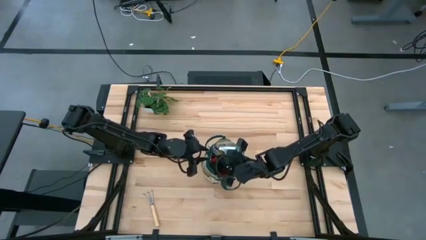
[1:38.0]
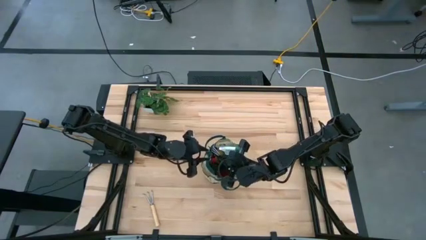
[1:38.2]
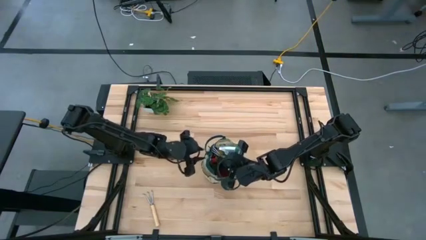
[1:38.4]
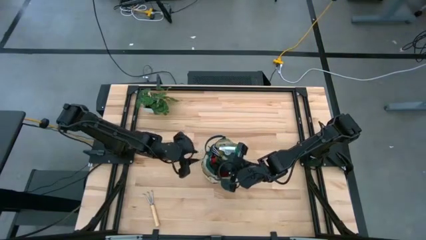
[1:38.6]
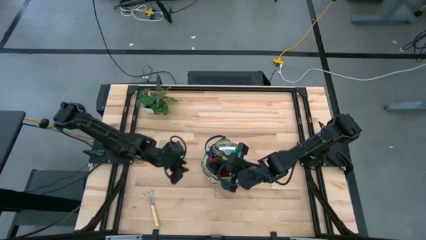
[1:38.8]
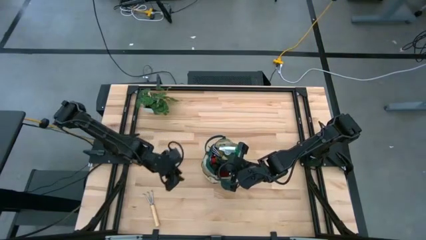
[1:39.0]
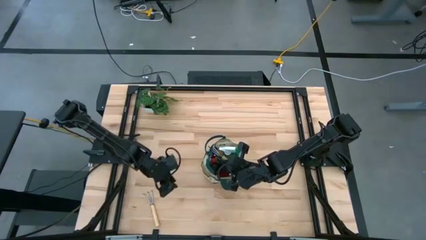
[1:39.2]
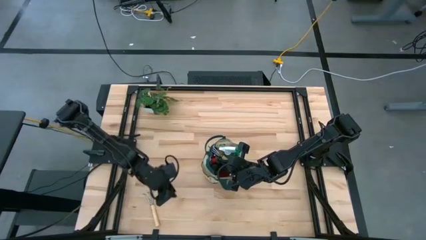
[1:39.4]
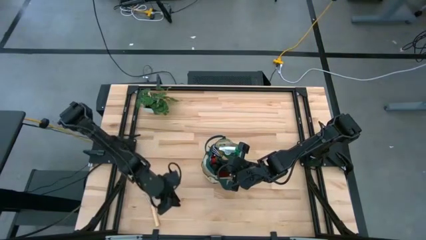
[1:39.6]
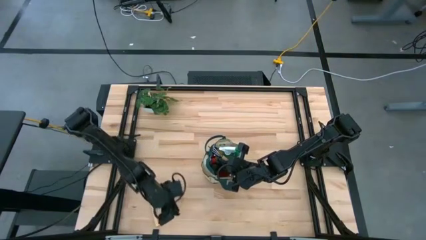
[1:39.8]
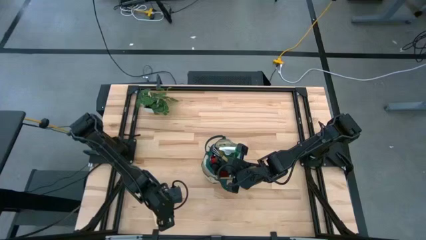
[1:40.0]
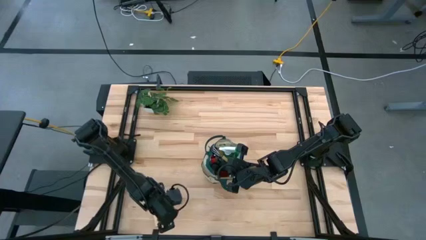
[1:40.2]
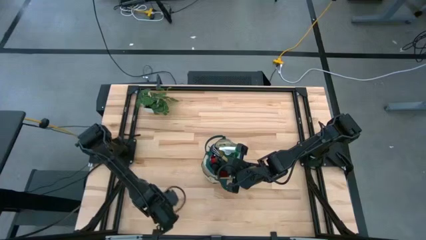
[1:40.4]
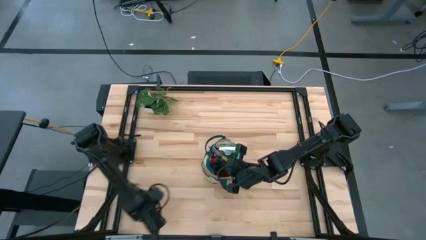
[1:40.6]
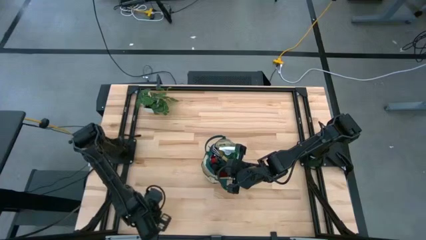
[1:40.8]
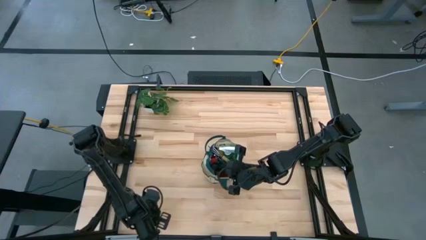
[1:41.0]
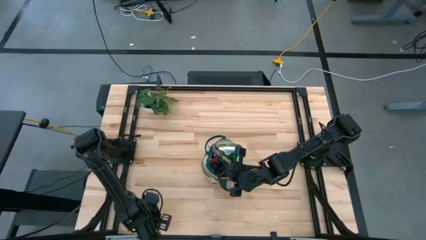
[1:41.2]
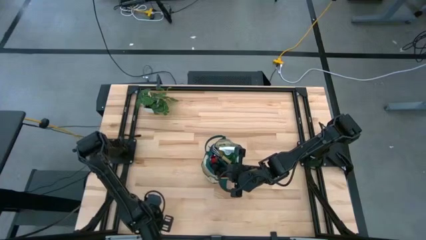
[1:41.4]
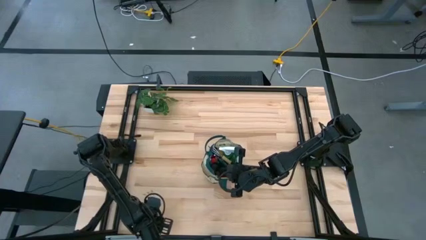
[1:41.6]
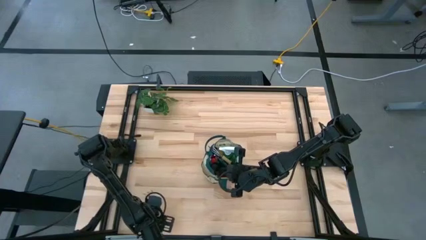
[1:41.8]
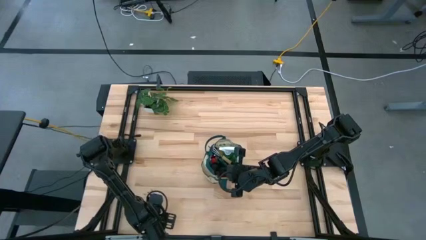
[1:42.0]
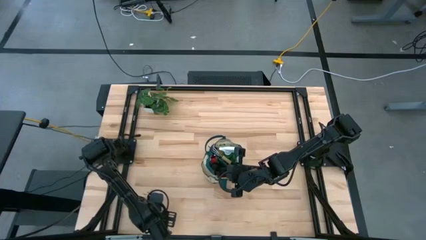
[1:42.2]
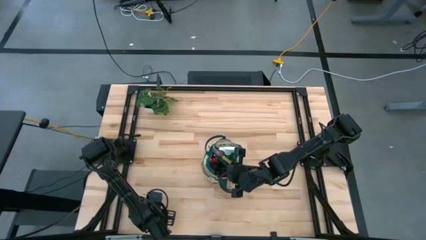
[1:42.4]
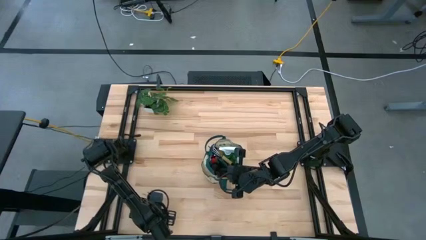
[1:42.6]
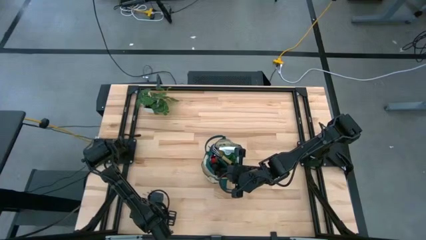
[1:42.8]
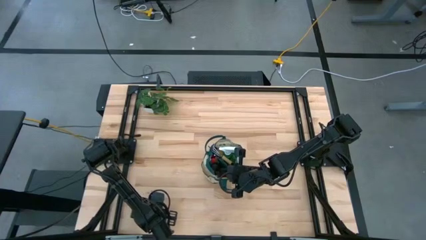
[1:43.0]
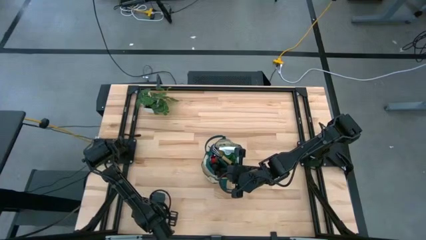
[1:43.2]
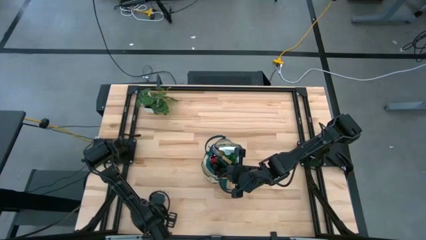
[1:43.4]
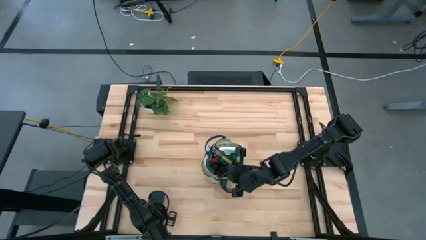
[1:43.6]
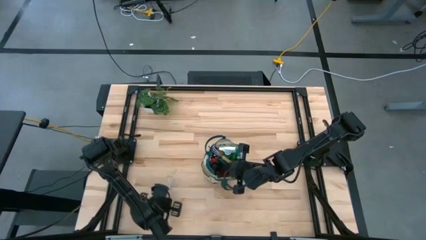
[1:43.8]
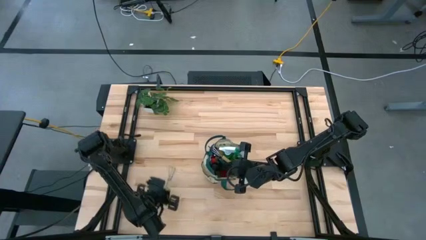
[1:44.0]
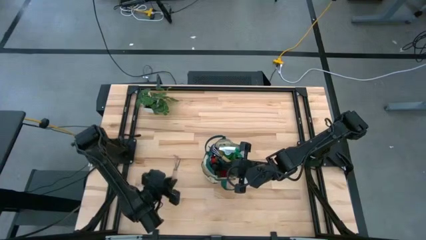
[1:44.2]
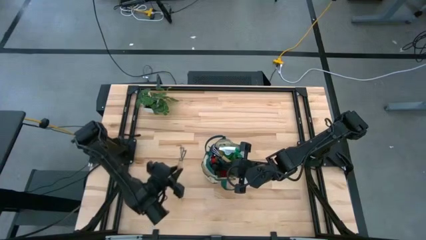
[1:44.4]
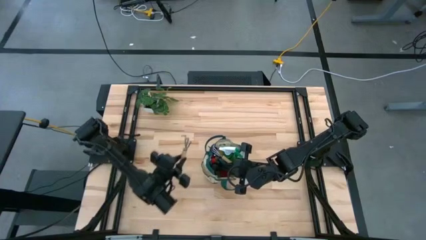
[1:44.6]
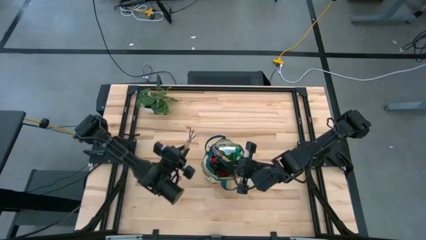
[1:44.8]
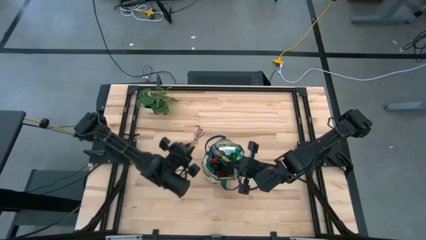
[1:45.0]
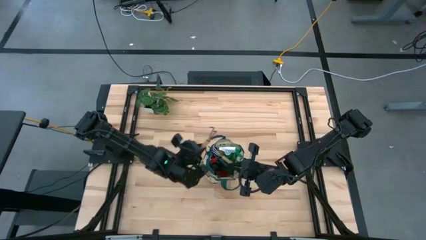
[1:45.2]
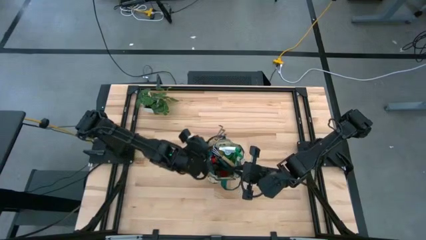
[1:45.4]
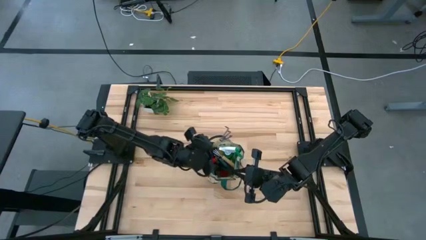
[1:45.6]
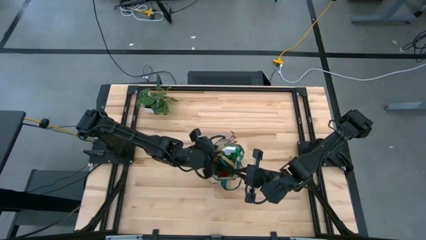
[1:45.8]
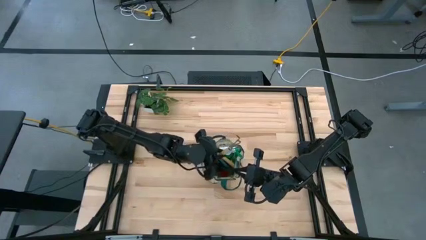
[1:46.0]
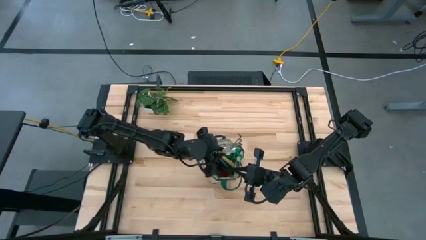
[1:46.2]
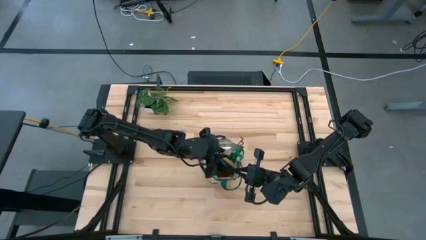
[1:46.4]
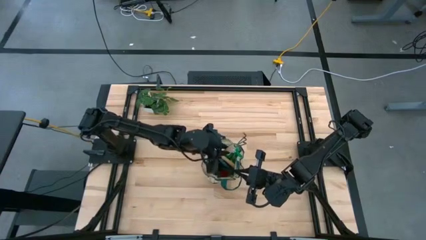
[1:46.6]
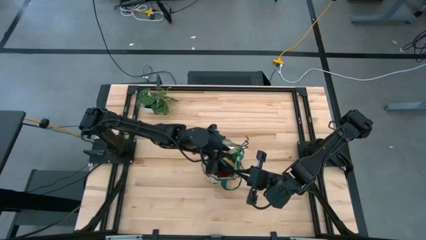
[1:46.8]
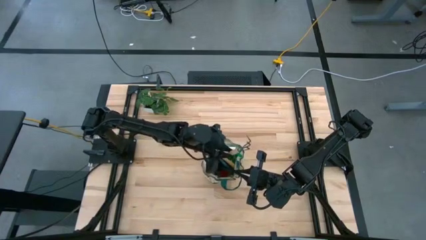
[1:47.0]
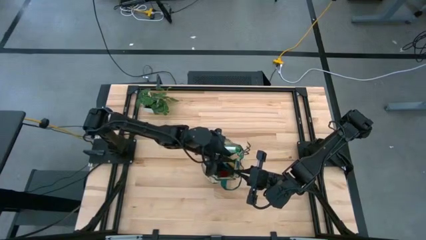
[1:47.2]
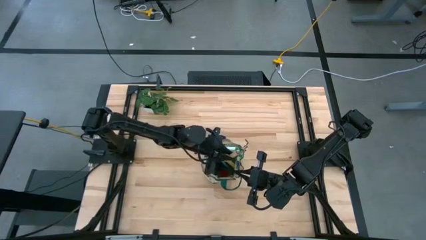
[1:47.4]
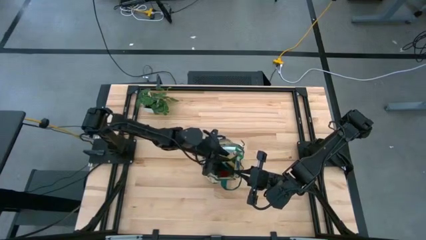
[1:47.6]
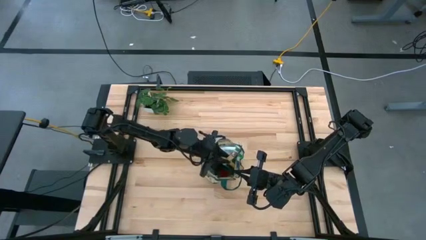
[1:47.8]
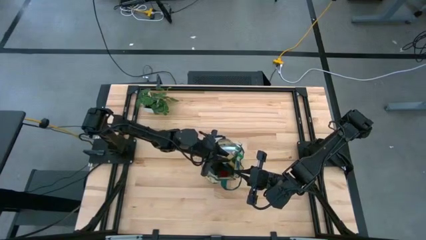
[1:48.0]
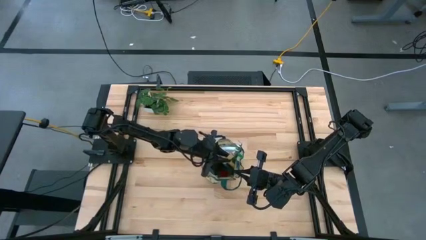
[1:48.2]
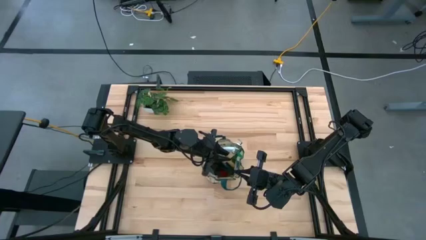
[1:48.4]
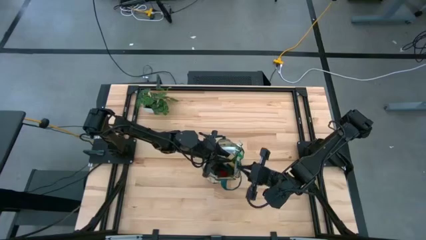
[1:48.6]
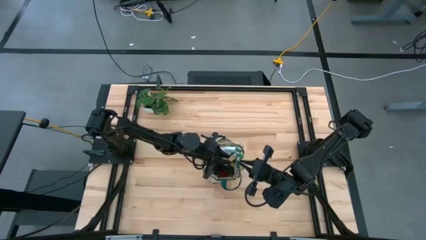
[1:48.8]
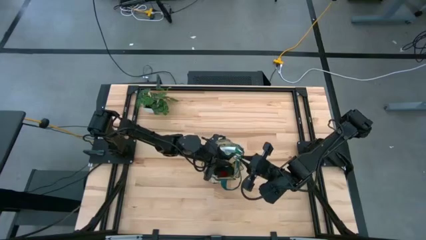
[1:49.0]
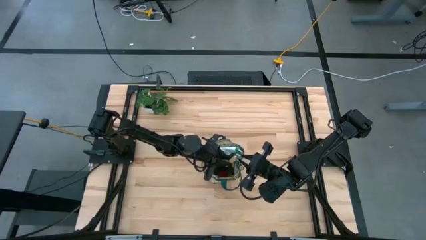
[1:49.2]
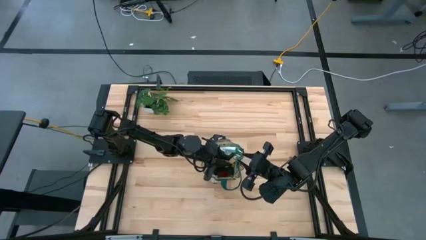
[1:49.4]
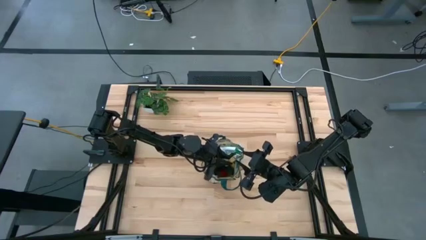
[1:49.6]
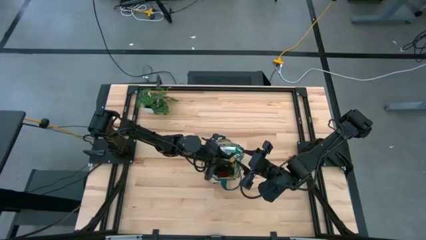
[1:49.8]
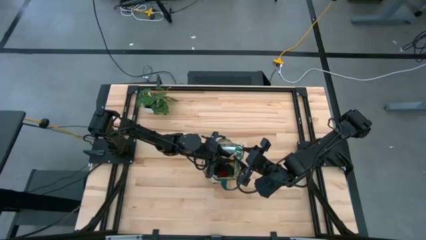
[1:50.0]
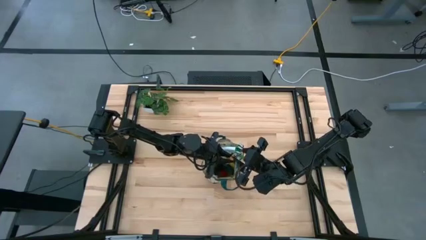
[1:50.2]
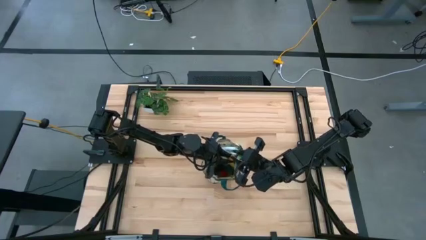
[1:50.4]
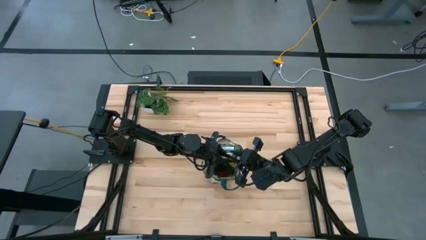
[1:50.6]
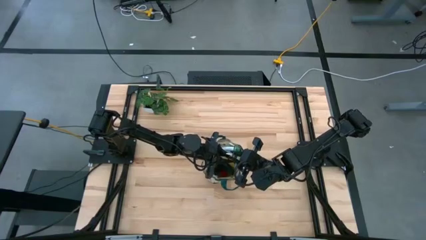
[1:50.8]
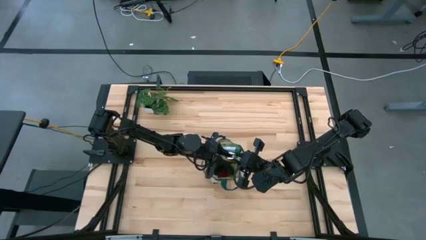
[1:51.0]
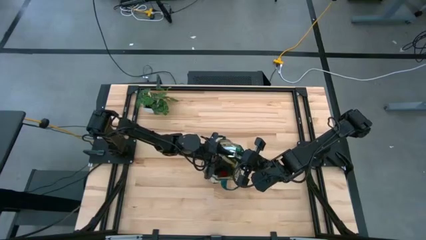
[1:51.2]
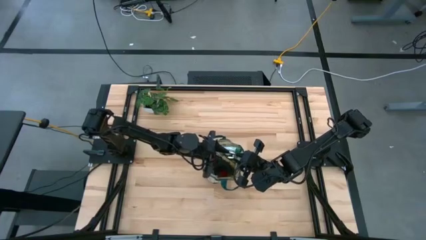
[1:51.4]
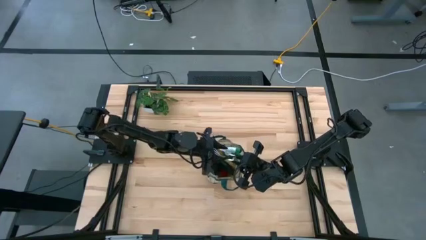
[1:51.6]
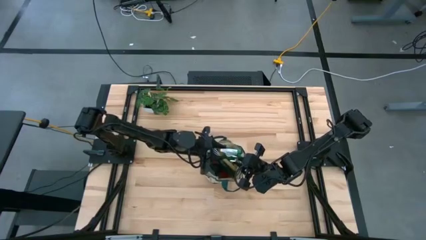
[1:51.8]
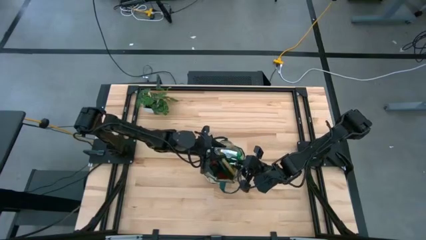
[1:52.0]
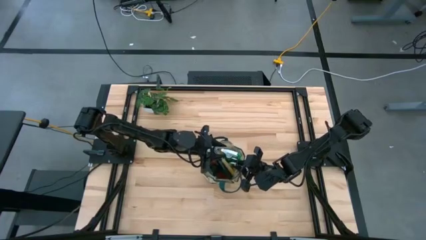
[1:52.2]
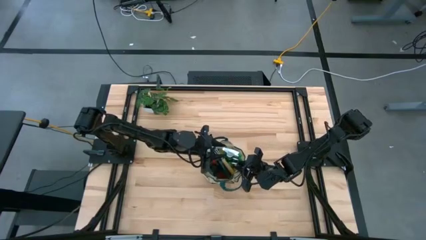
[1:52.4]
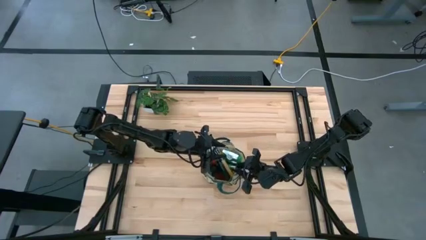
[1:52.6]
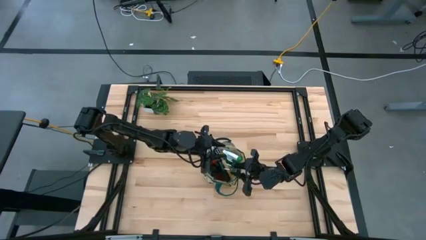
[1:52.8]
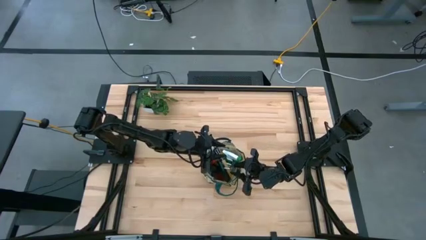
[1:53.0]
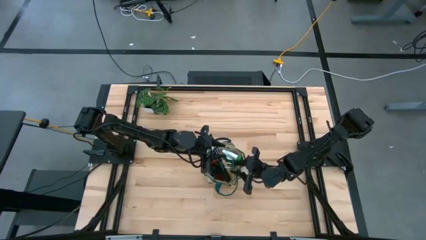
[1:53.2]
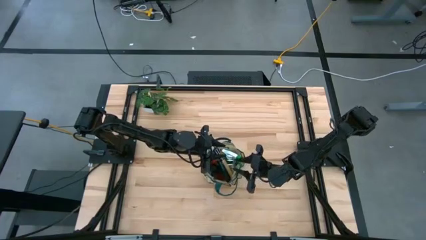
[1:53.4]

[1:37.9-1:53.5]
Task: Pick & Place Garden tools in Gardening bag
Put the light brown rake into the green gardening bag

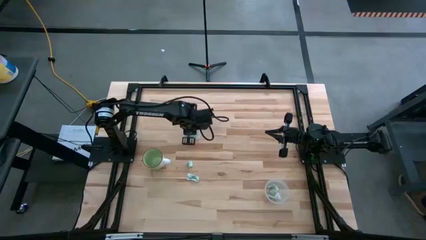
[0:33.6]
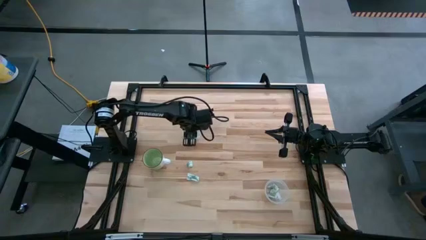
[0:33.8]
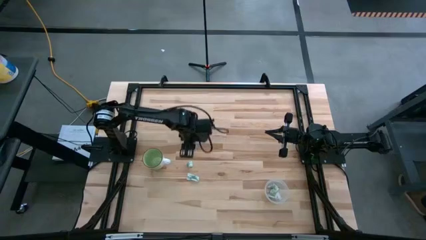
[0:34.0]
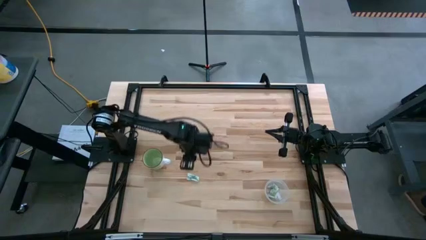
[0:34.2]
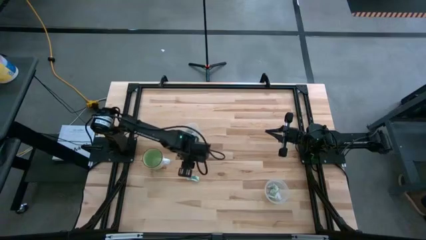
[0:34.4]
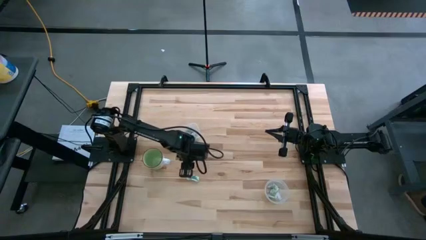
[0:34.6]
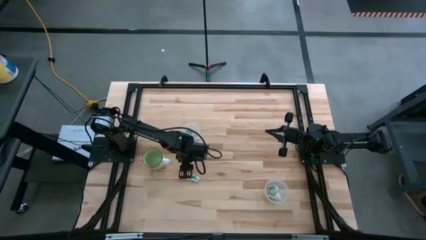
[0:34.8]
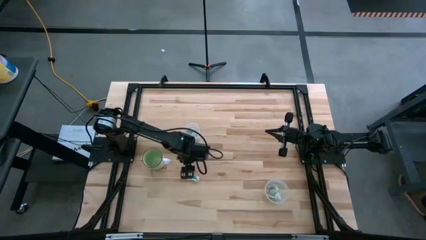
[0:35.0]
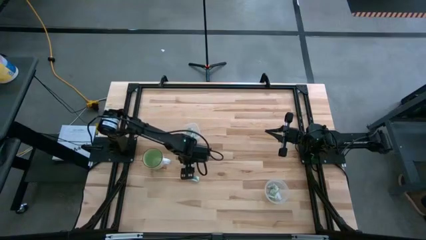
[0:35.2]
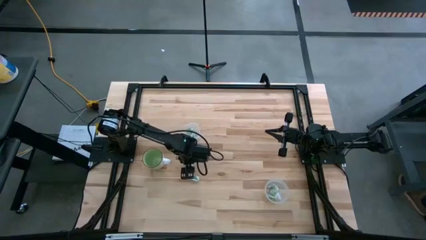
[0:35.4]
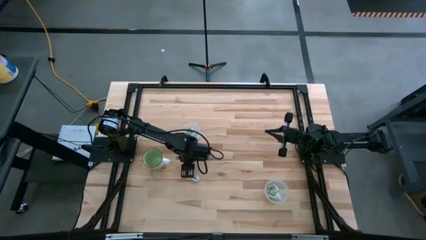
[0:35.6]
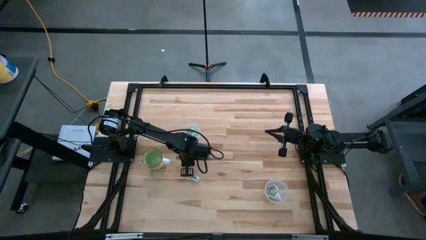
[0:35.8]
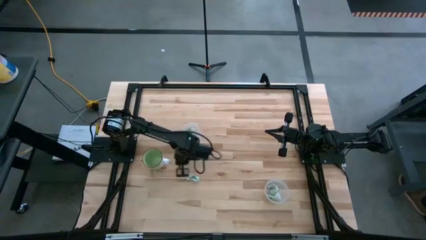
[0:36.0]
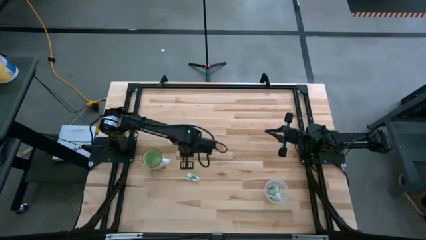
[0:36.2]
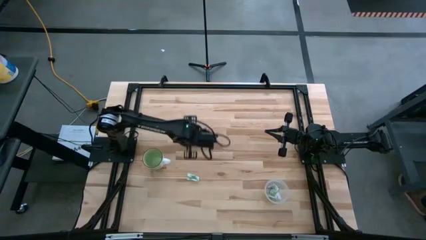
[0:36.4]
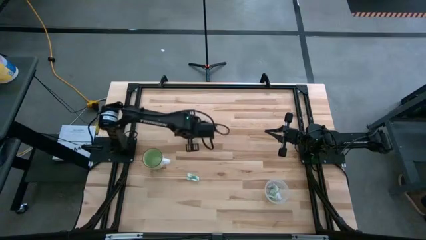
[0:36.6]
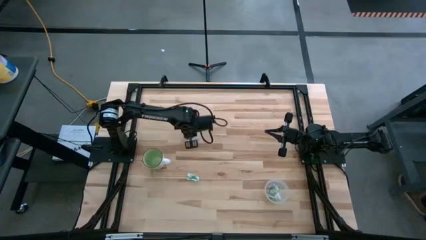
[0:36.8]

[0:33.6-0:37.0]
Task: Pick and place items into bin
Put the green stevia packet into the top transparent bin
